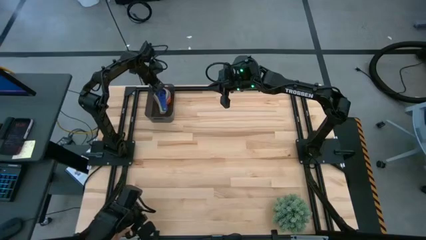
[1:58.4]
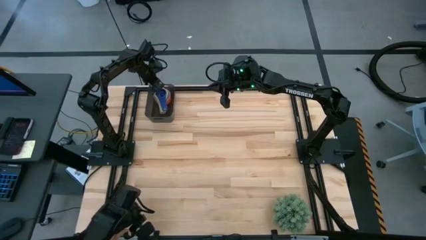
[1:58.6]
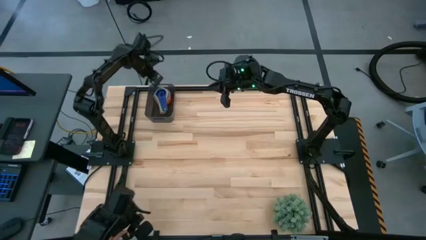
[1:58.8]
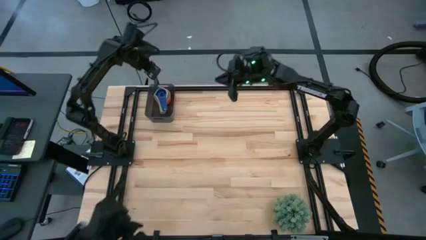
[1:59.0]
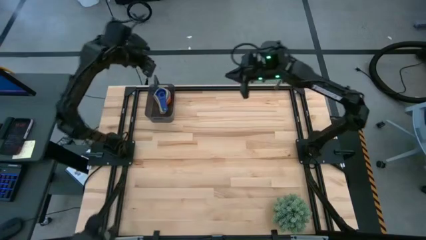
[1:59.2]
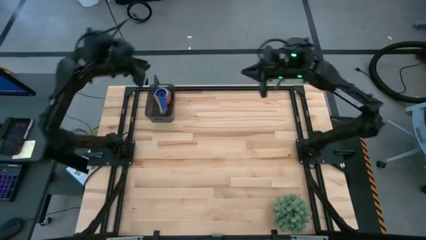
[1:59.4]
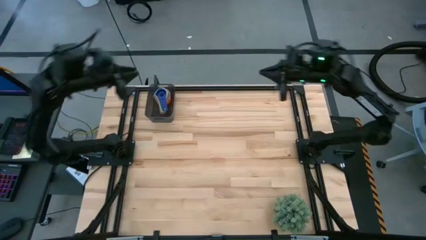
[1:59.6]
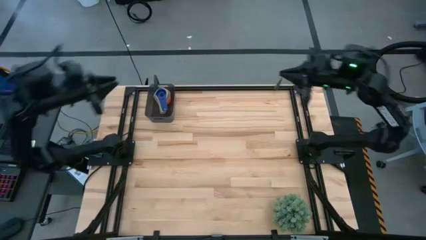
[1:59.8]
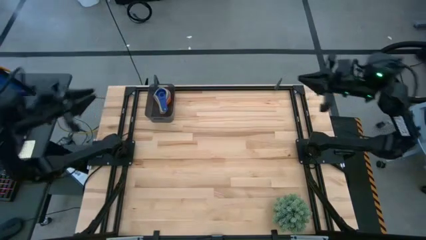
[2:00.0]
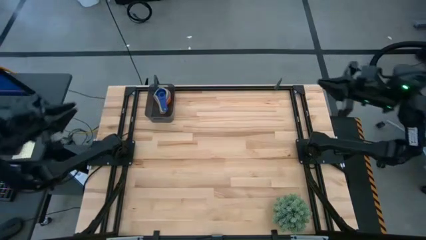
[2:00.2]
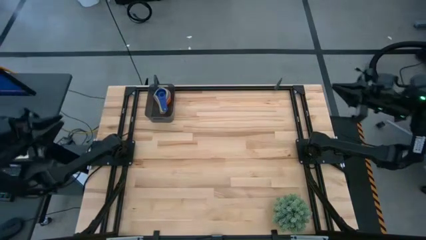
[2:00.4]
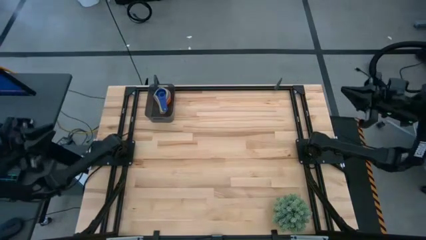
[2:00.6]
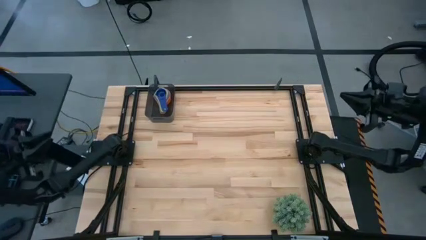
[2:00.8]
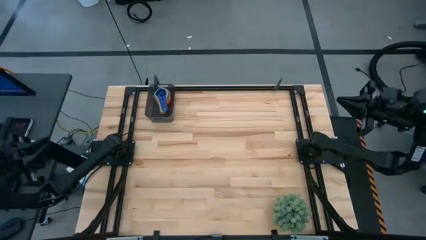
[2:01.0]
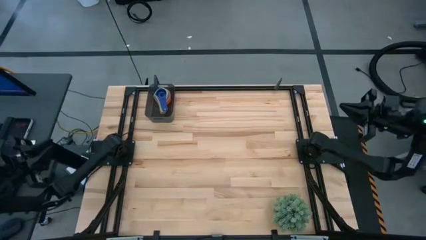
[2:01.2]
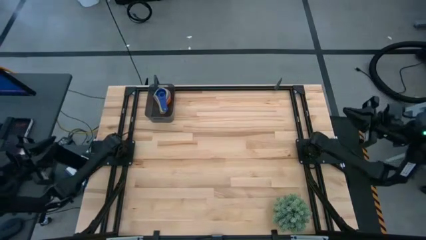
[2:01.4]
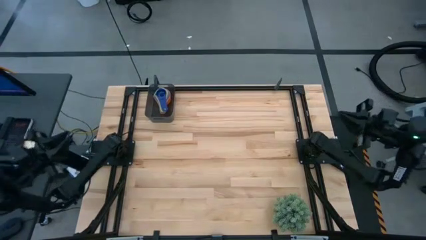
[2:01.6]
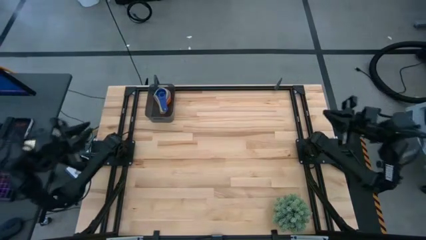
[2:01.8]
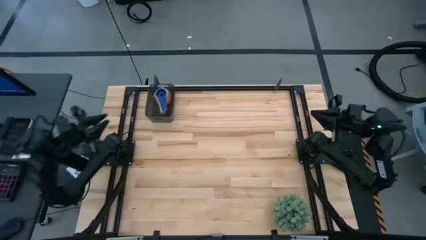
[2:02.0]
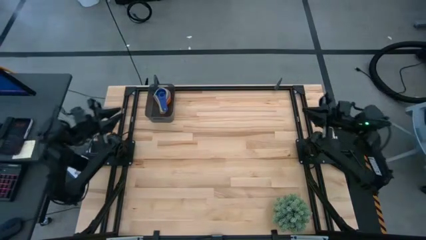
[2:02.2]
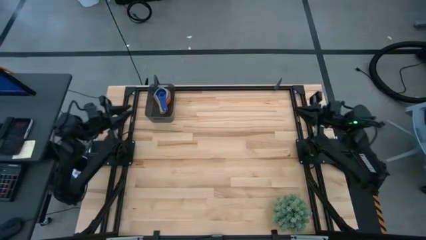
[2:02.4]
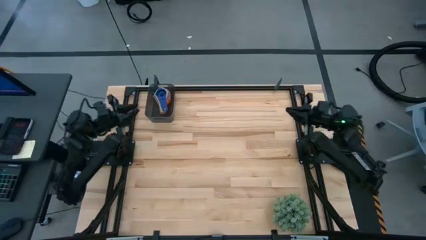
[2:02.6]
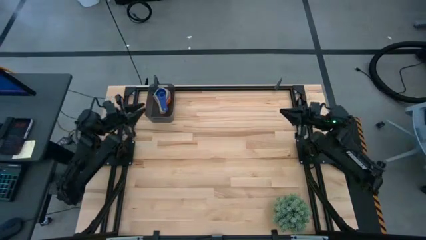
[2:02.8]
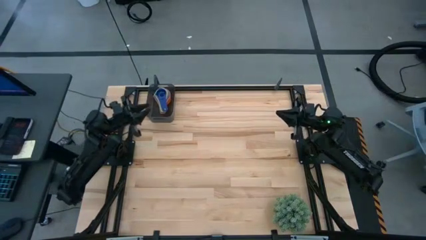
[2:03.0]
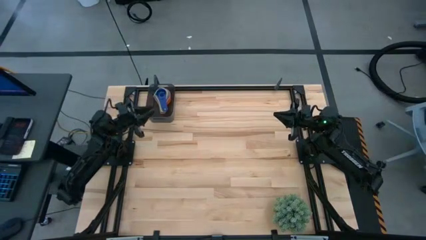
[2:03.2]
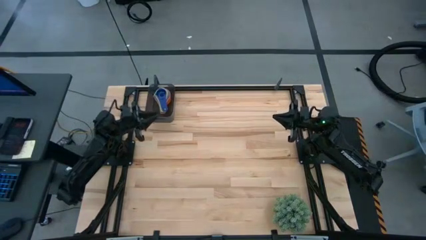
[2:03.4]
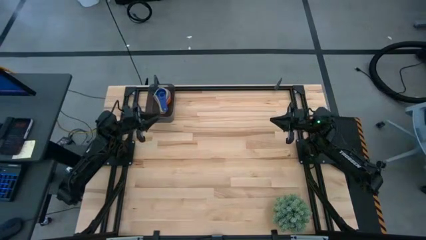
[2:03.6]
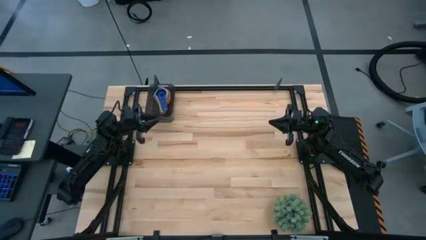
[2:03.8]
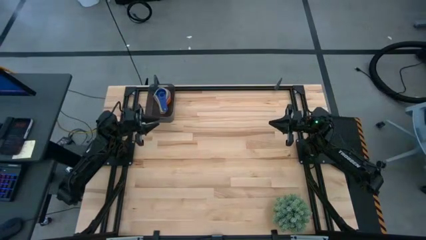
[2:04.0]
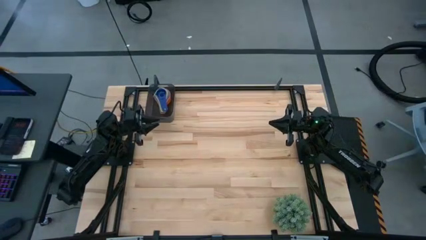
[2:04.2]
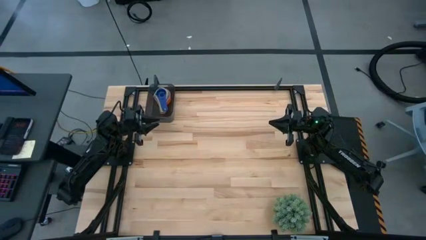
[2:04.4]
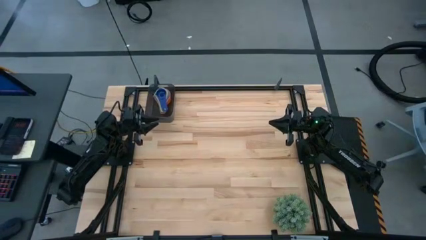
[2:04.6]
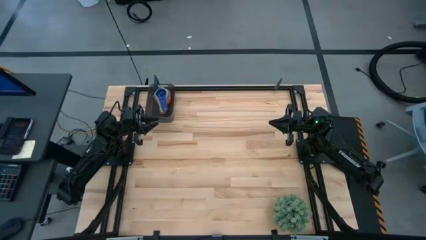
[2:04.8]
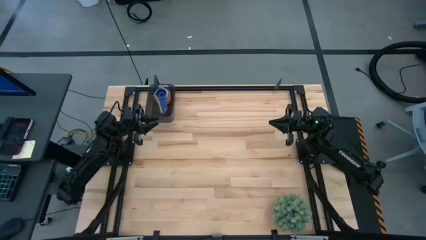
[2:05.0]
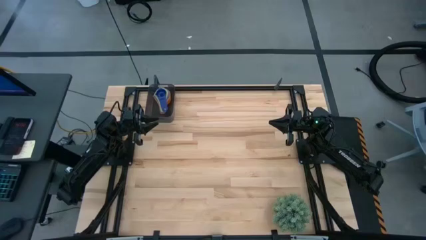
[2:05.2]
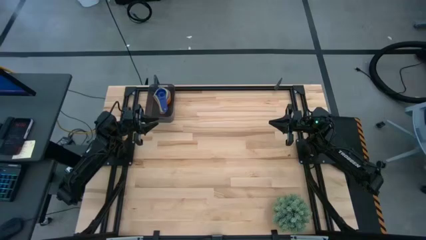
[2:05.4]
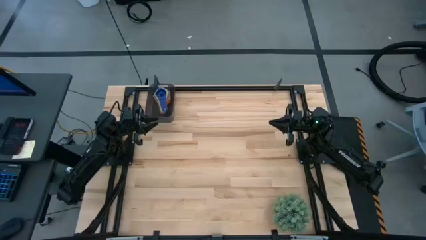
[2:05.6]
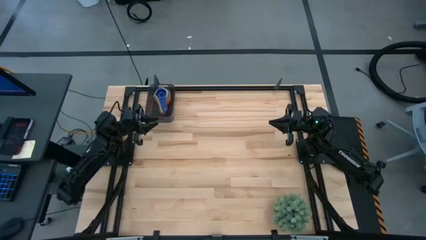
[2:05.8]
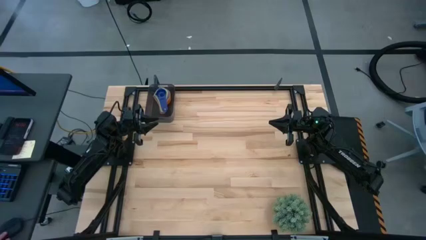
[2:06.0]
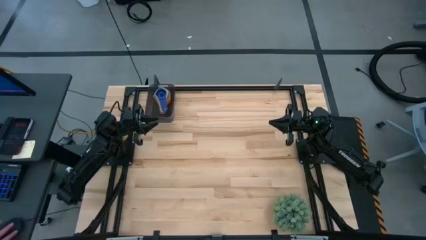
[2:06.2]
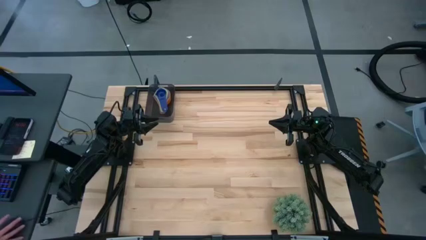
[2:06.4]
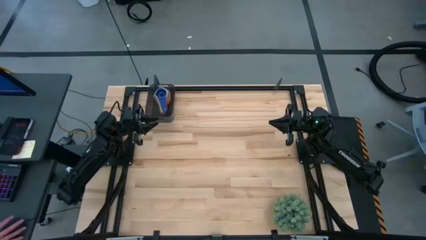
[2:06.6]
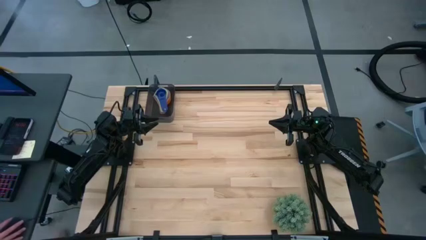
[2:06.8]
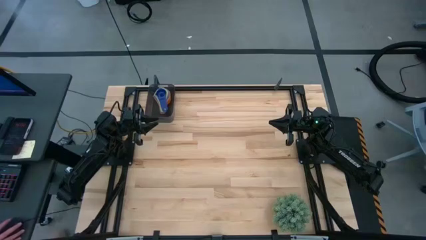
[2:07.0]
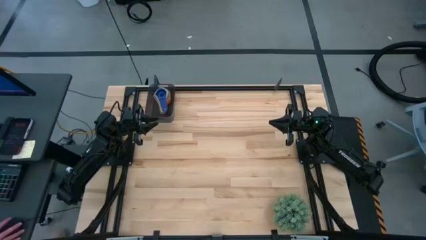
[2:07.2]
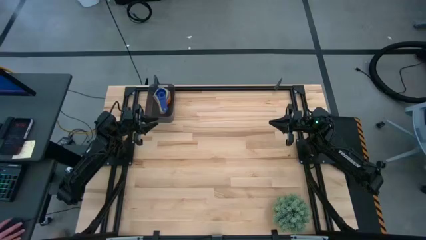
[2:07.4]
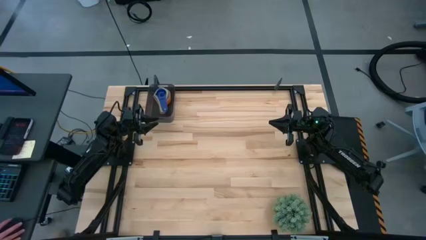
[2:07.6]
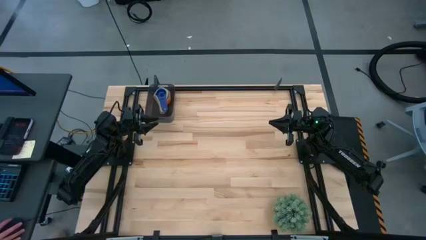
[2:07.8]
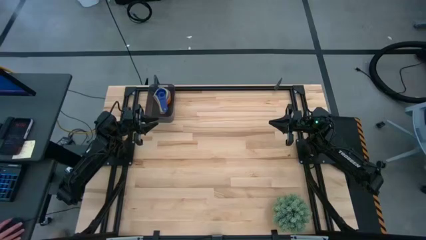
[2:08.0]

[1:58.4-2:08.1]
Task: Nest measuring cups in basket
Return to Home Position

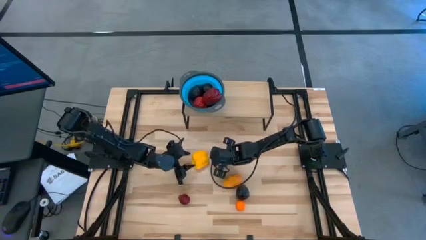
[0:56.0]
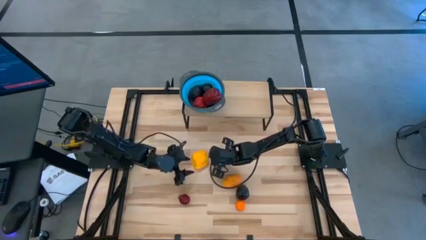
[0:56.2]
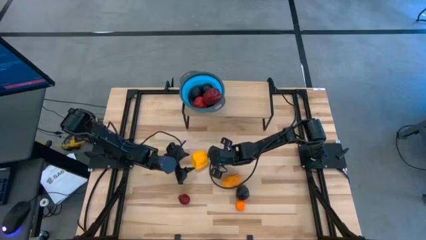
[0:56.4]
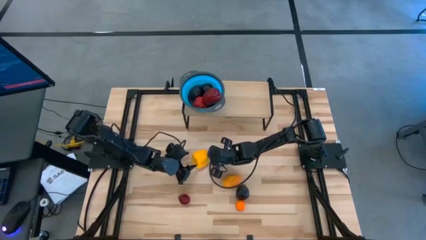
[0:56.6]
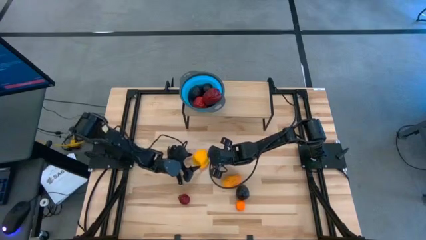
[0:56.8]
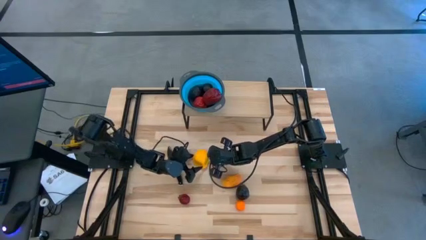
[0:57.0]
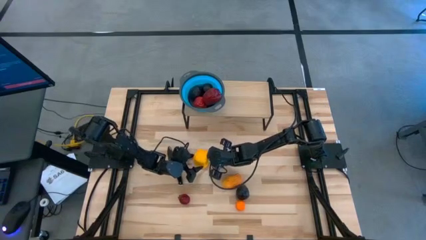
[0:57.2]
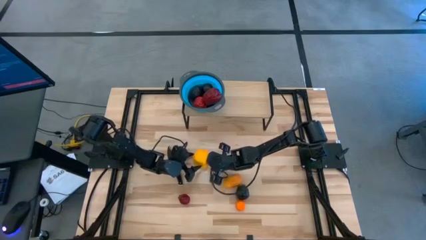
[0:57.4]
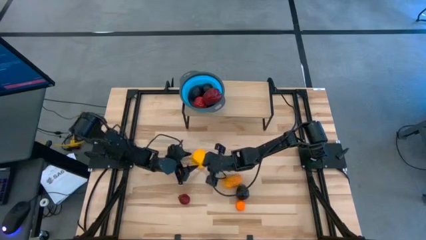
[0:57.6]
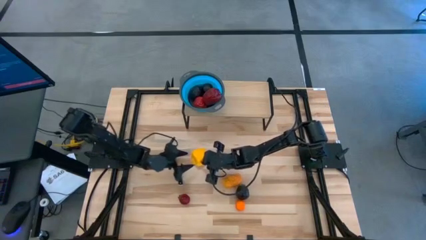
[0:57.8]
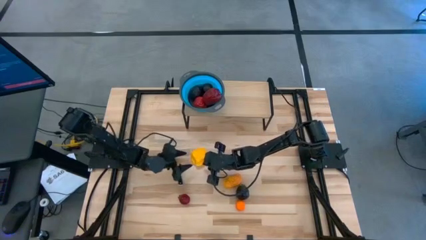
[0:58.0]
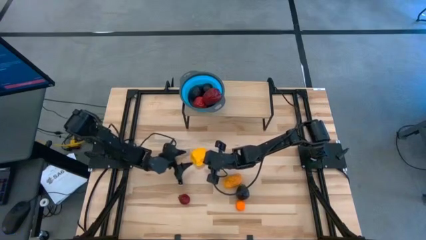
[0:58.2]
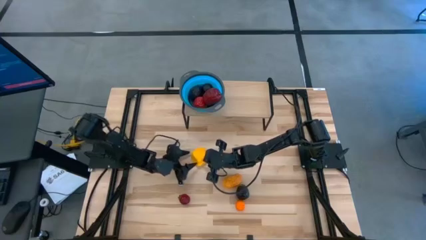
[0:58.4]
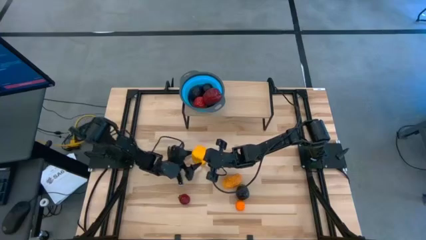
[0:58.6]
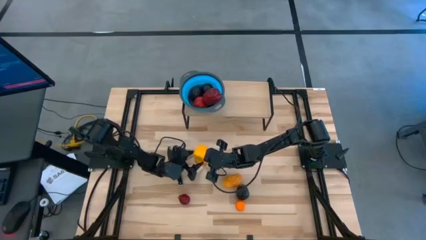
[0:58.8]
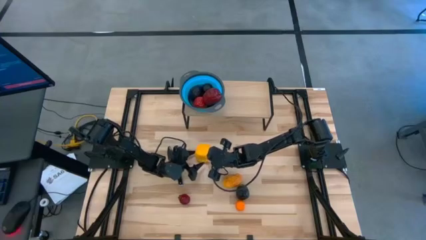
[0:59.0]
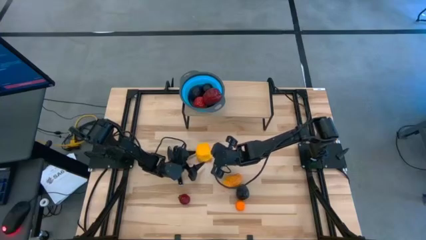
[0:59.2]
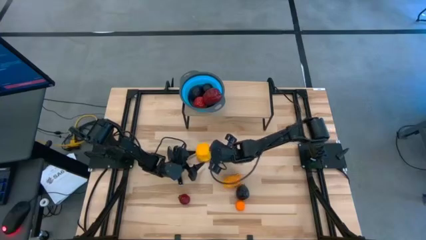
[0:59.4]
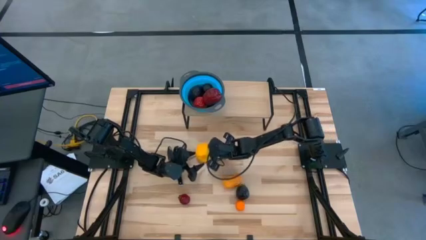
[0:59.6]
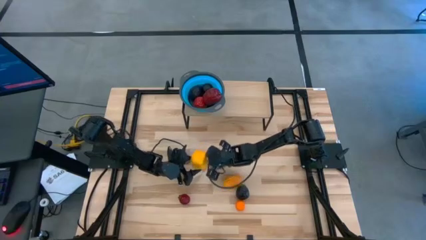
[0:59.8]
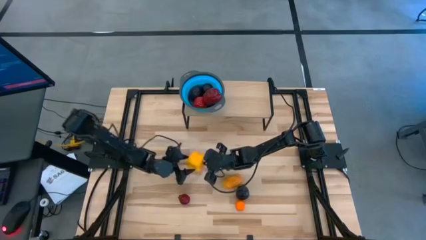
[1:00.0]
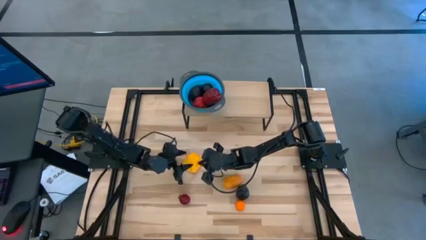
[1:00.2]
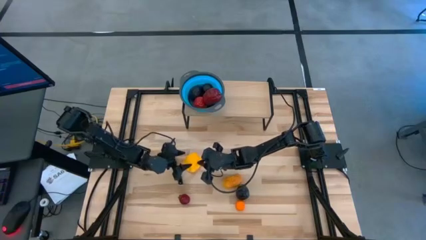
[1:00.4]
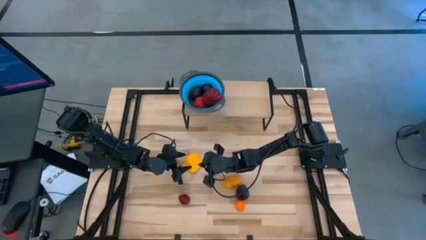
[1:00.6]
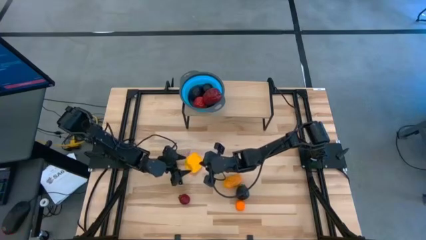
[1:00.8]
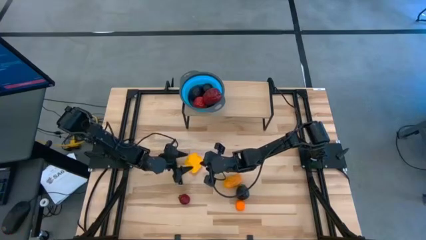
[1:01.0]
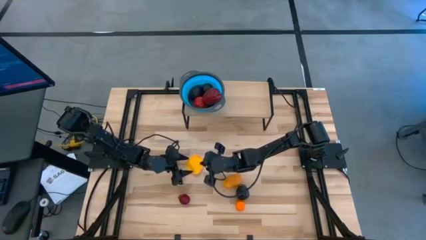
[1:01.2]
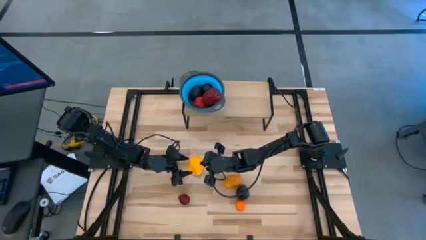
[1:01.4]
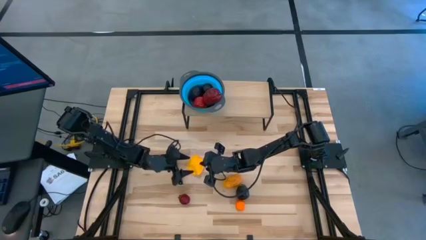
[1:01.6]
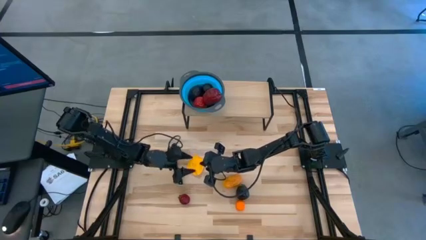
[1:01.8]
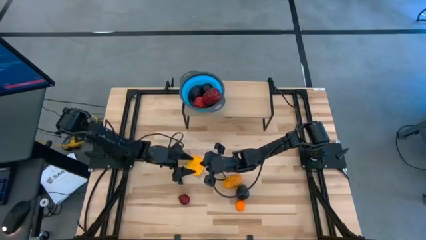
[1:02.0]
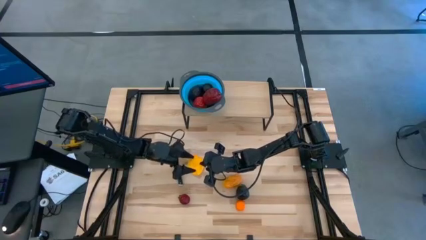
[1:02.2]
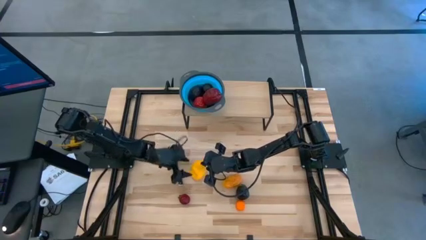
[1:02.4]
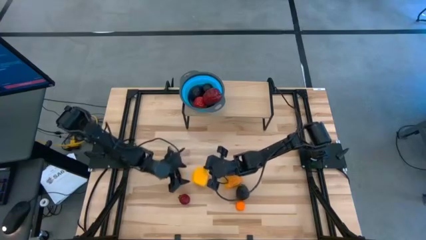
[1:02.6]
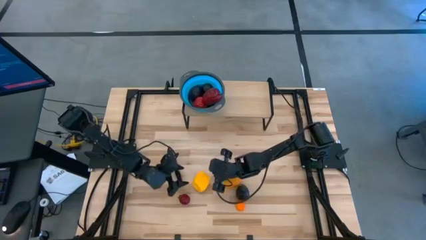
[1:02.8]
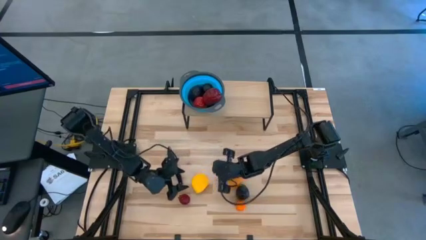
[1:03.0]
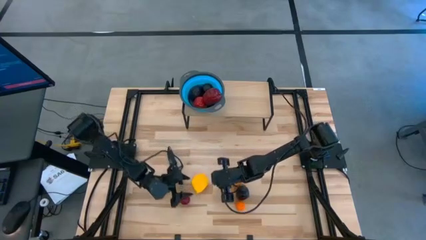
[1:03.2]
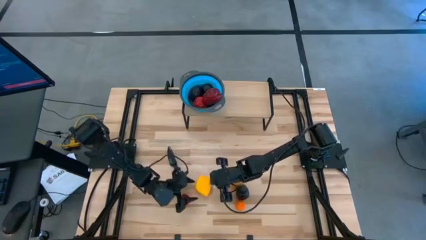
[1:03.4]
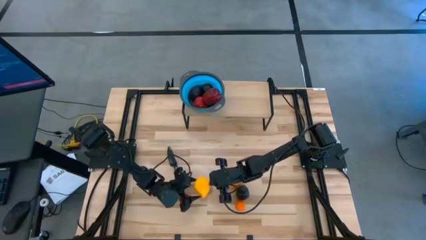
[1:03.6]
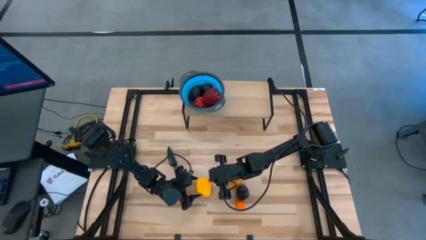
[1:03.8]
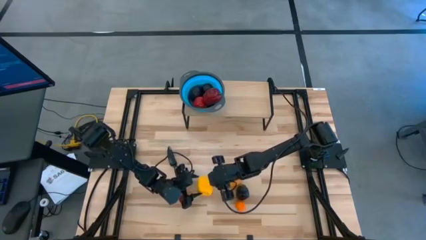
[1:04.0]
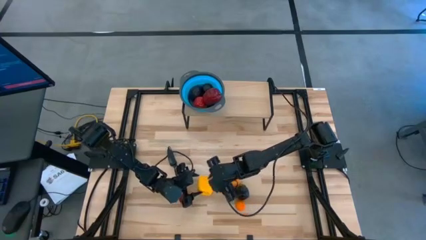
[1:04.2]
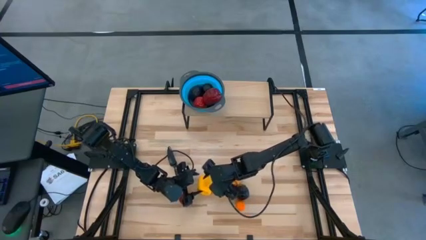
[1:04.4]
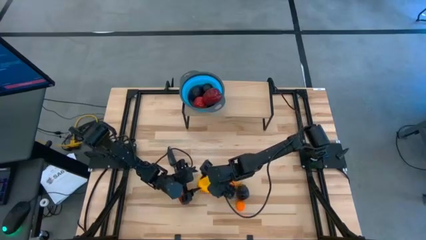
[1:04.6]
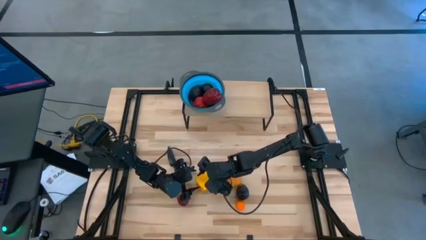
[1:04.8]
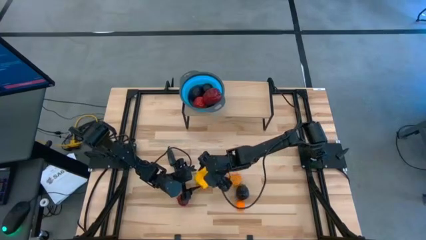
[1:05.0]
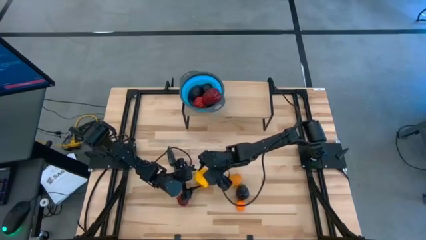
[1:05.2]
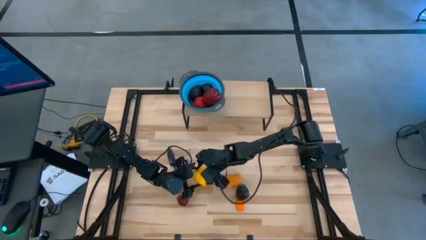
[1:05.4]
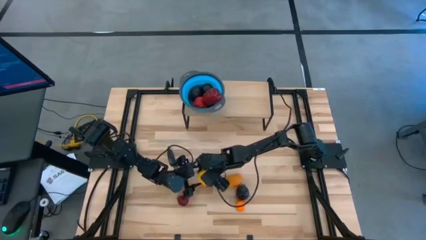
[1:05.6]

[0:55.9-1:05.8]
Task: Pick & Place Fruit
Put the yellow pepper into the blue strainer bowl on the shelf
